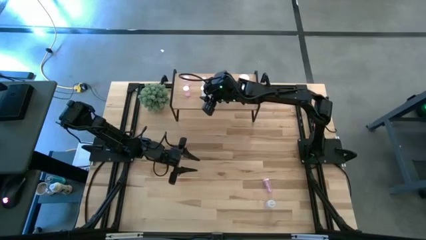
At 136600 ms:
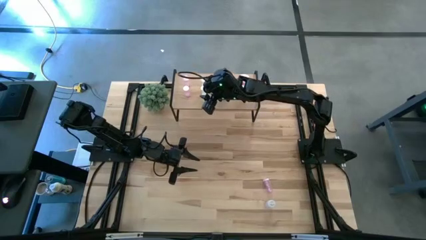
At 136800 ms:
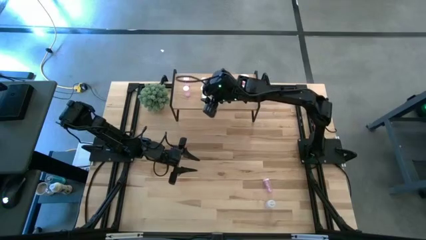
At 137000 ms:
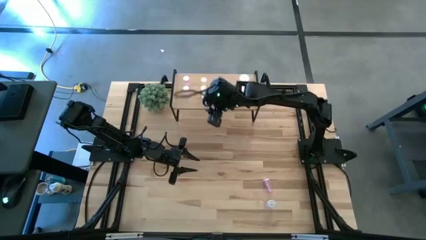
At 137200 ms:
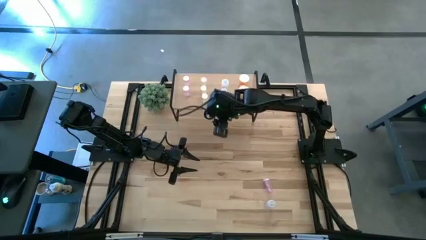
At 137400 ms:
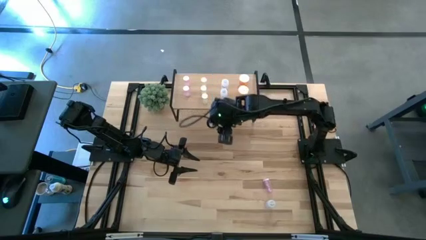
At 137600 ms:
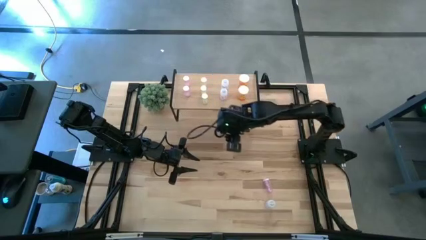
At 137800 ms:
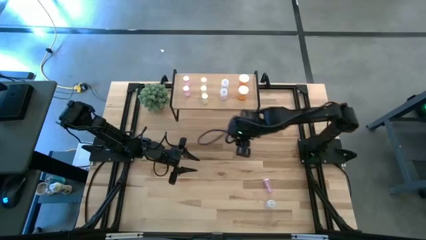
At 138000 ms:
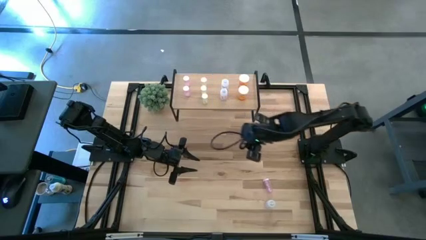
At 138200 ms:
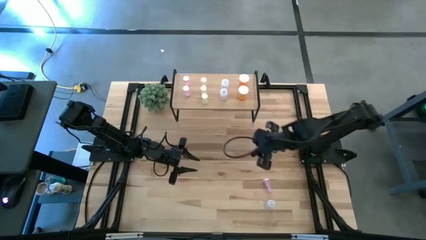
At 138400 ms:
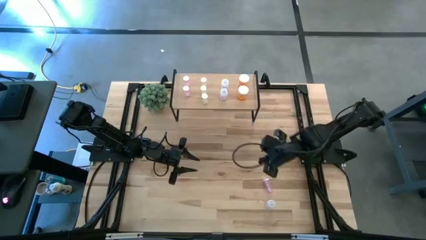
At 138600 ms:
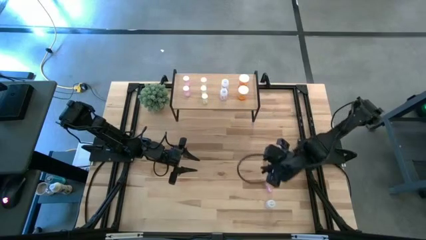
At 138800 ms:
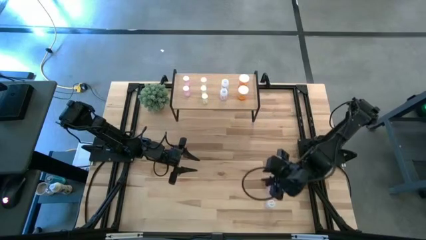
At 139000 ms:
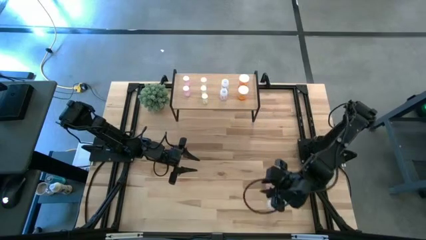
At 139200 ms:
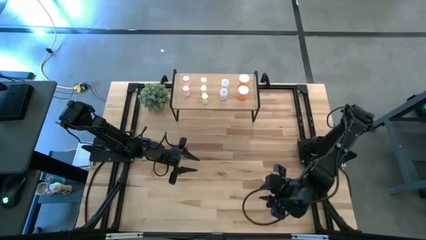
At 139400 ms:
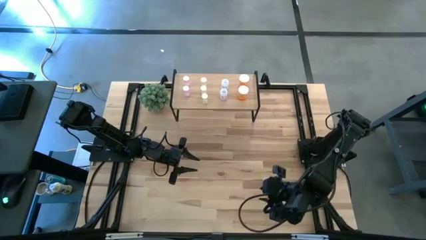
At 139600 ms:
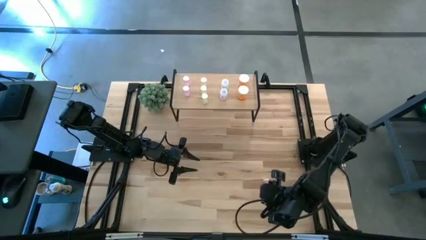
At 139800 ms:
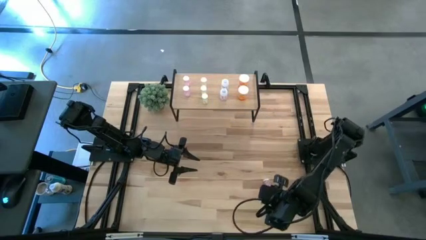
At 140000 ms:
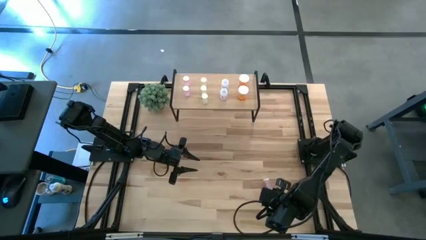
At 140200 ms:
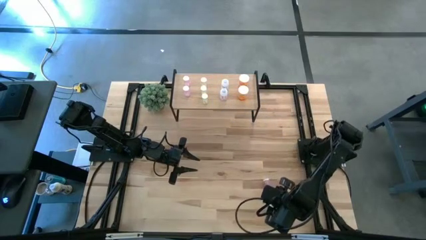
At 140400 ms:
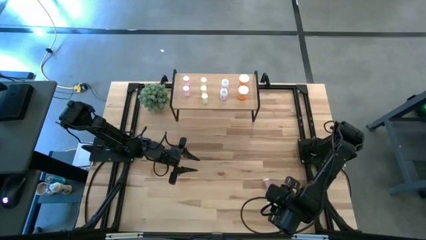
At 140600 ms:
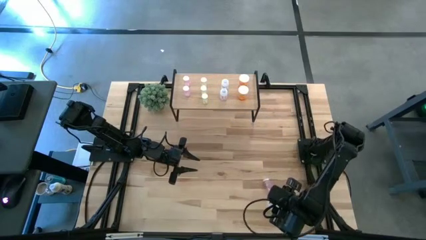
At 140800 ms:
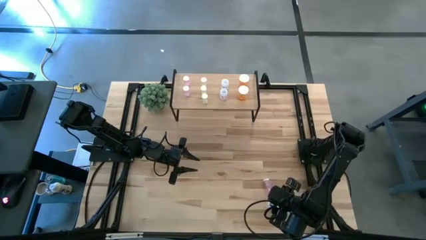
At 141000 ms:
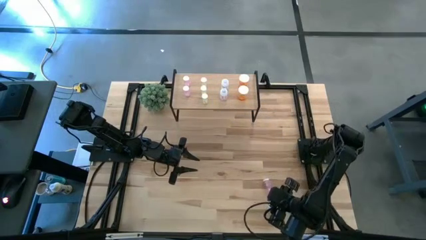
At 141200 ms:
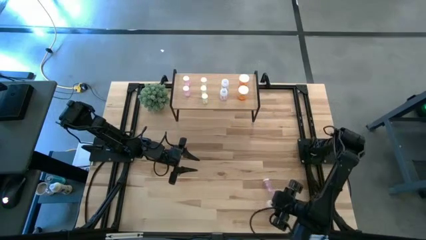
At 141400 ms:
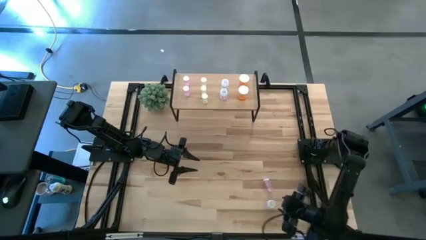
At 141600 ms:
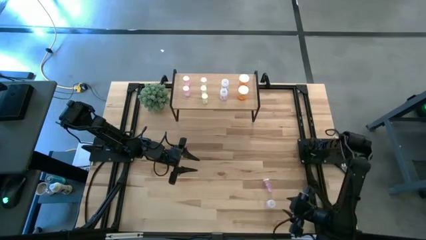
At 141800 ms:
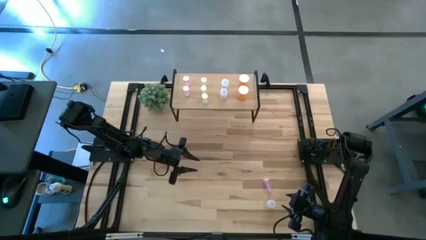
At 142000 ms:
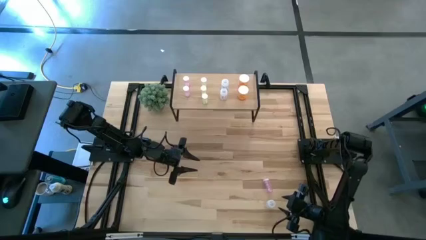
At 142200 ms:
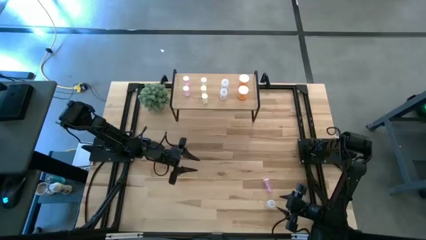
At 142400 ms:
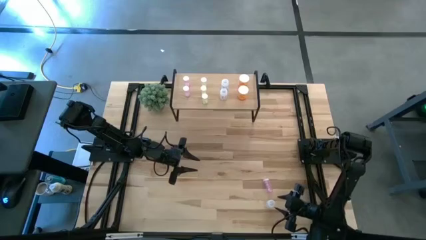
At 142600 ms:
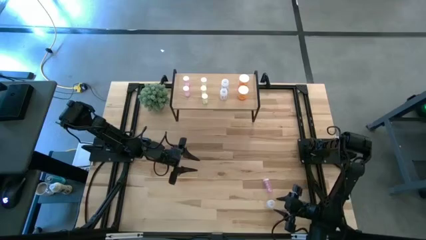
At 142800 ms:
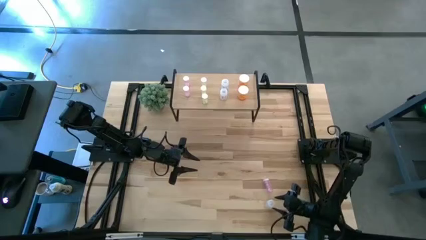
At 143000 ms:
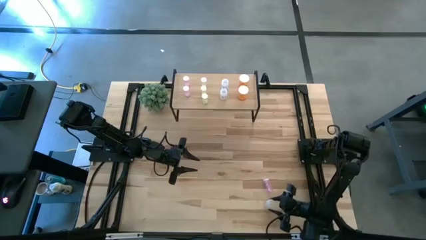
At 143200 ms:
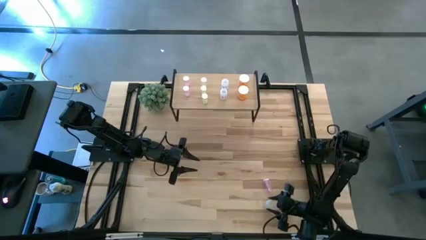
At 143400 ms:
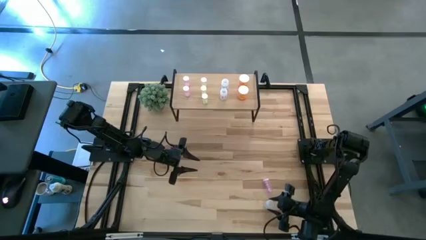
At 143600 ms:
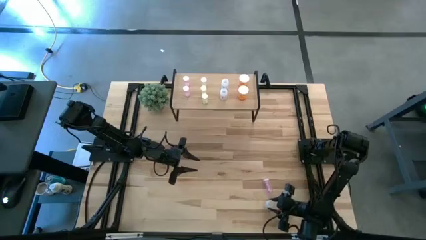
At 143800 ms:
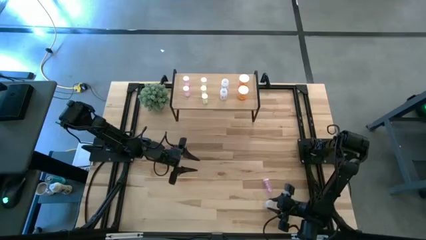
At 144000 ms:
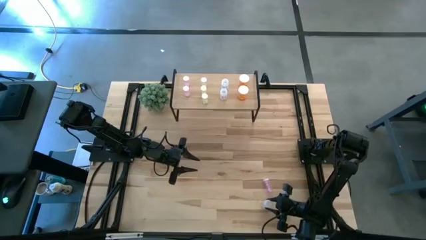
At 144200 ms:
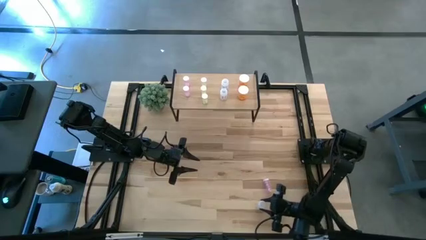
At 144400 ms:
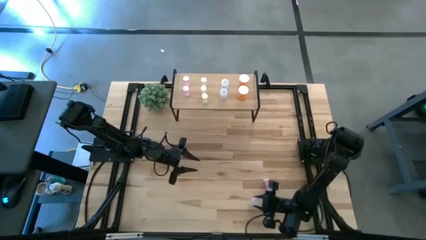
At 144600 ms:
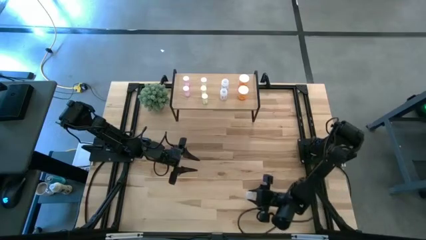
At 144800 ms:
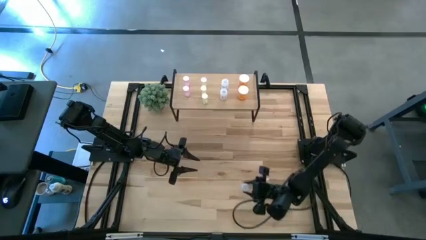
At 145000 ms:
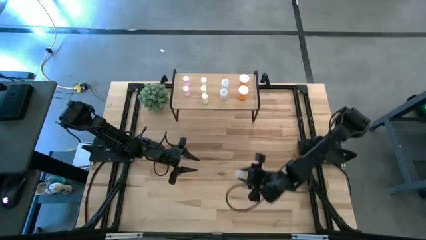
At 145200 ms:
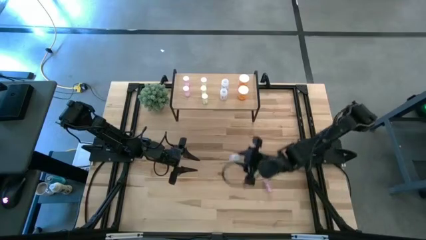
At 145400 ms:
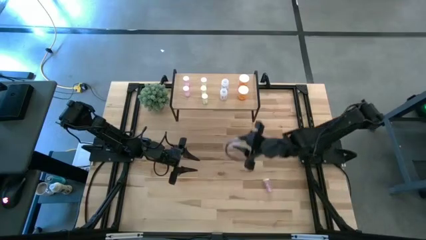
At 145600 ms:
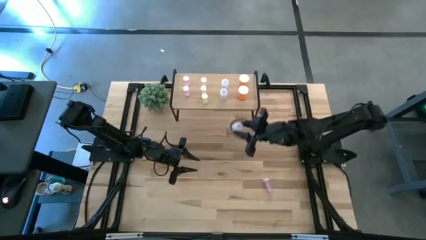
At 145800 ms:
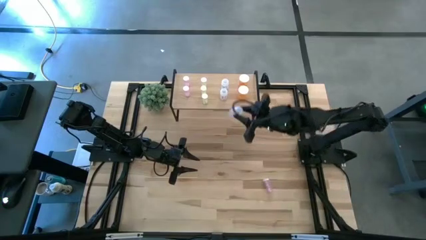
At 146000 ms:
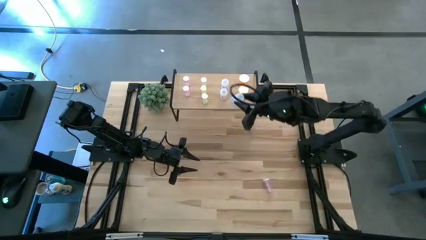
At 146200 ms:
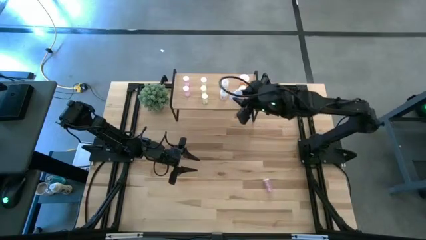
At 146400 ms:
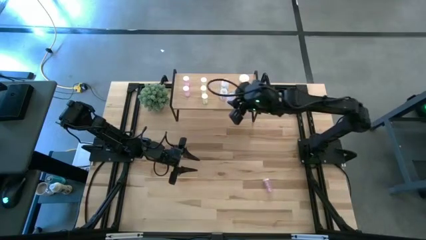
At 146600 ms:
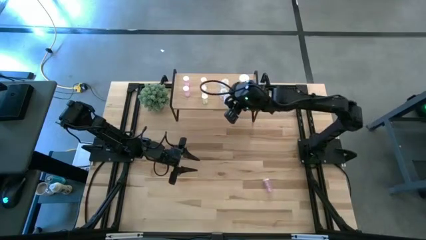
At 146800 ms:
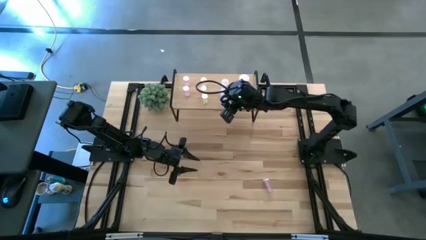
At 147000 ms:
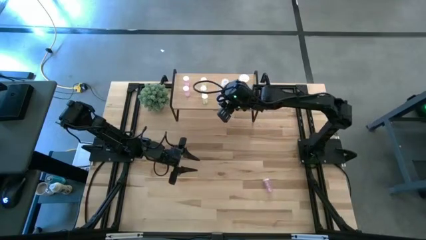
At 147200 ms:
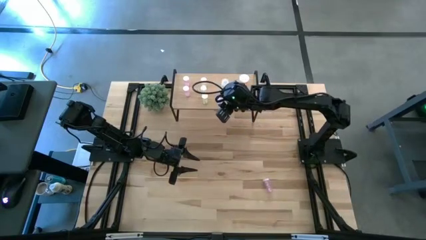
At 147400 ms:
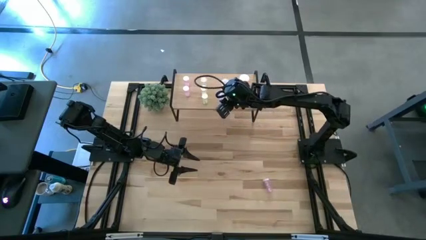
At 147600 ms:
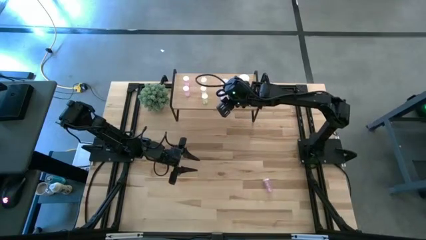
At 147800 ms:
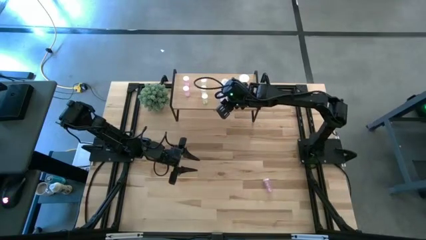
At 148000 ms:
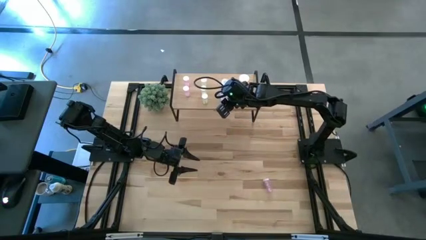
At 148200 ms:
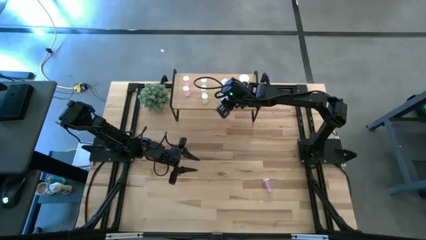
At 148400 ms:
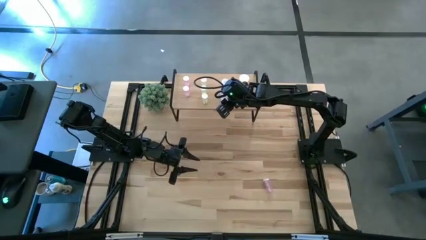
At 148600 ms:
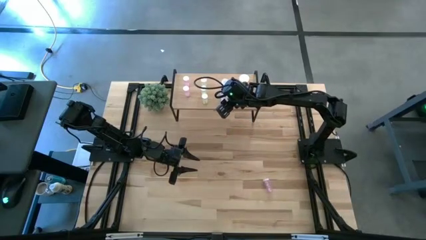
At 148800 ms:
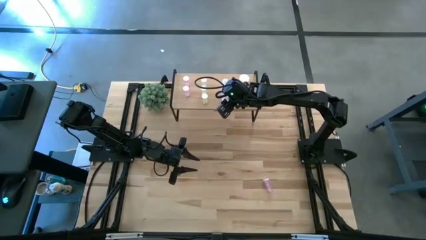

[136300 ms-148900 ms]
Task: Pick and place medicine bottles onto shelf by color
Put the transparent pill bottle aligned with the other transparent pill bottles on the shelf

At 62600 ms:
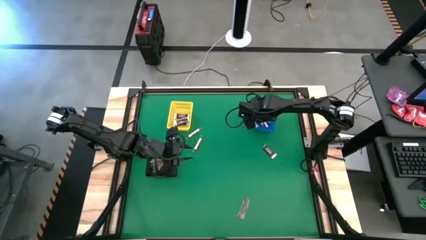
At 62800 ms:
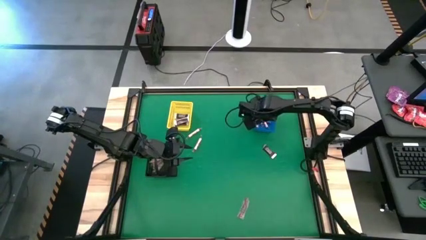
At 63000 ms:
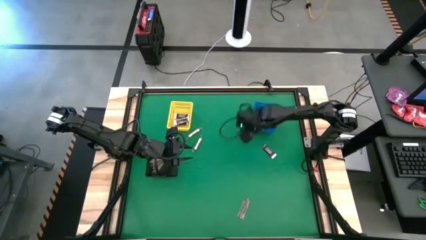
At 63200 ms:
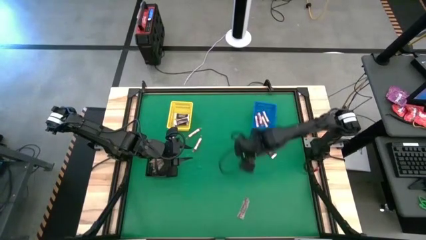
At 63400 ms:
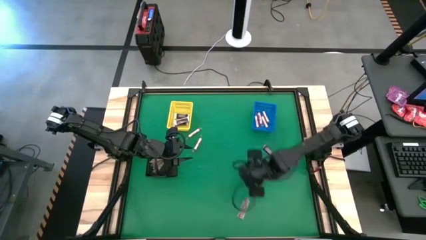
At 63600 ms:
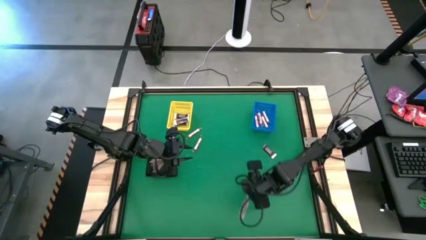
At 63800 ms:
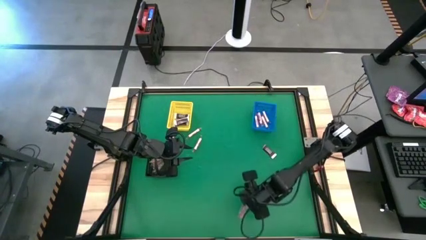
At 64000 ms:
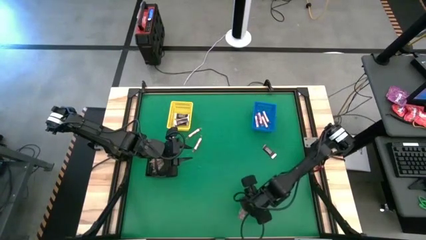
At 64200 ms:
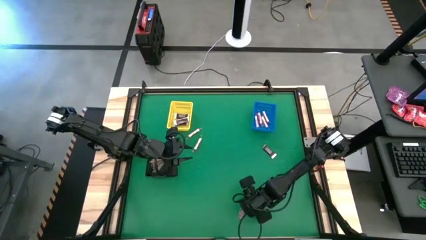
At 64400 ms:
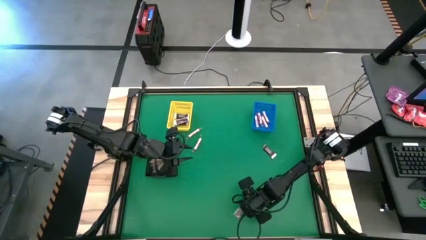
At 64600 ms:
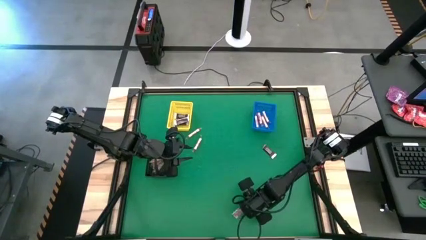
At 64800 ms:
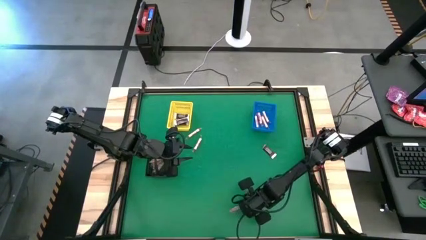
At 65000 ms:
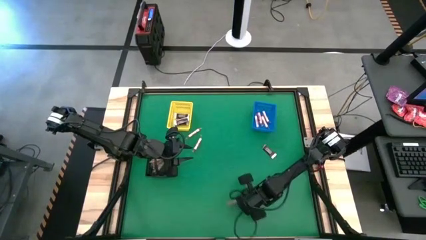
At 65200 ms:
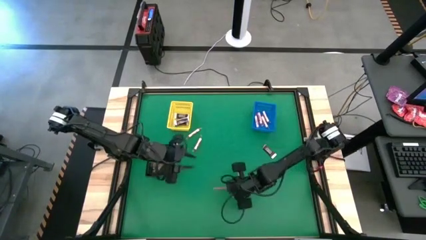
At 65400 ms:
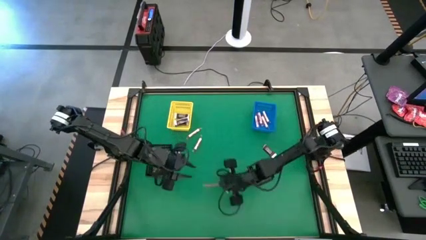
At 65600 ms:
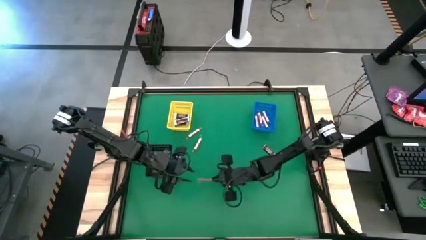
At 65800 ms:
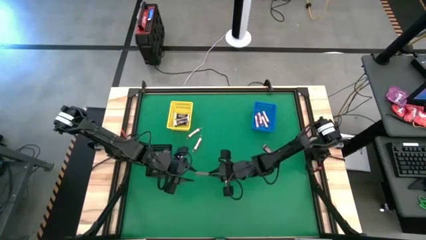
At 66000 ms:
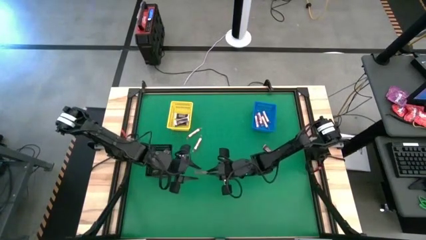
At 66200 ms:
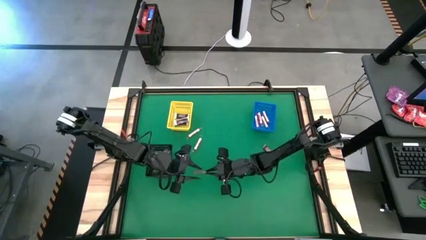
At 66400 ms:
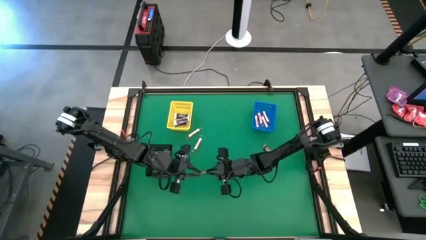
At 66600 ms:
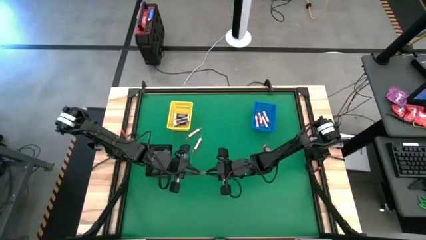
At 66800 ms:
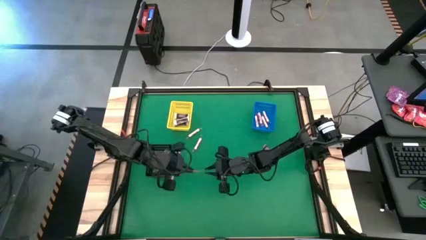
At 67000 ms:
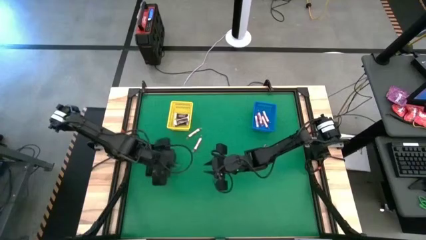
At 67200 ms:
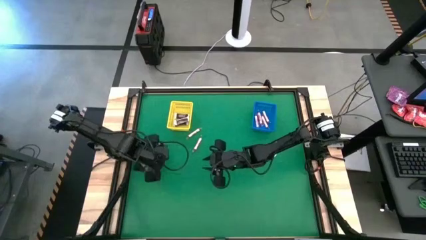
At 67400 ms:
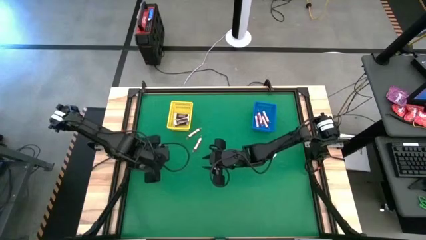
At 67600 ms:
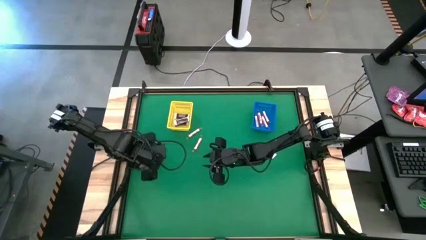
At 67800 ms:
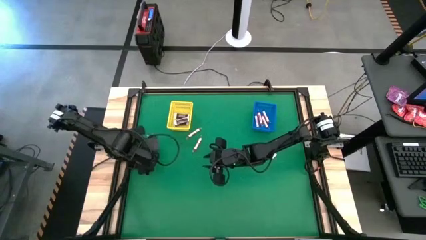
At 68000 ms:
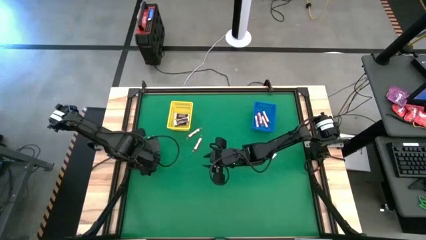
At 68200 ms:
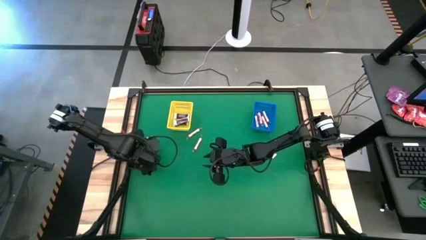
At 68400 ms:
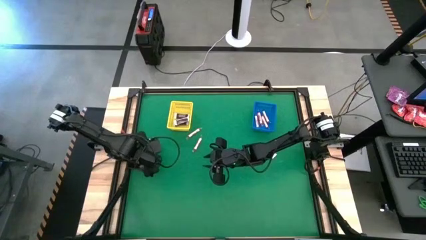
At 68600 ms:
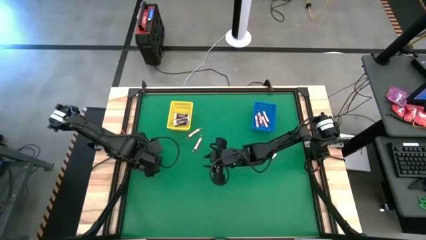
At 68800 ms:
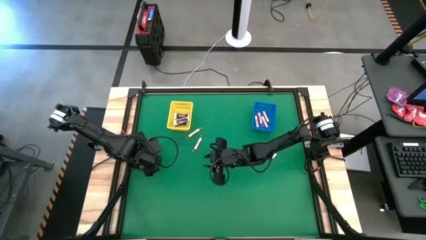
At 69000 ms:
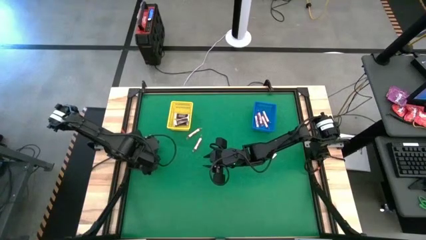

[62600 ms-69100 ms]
Task: Sort candy by brand, put in halloween buckets
Put the red candy stick into the black bin
